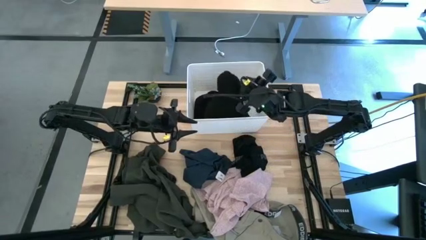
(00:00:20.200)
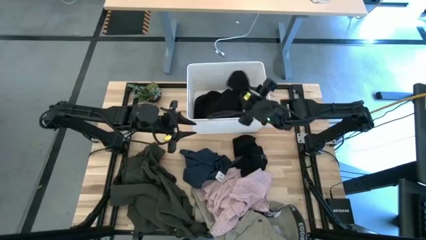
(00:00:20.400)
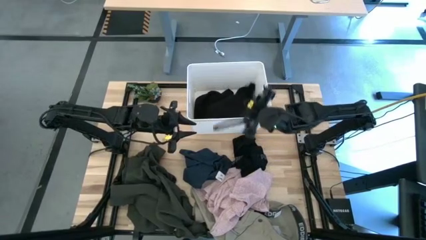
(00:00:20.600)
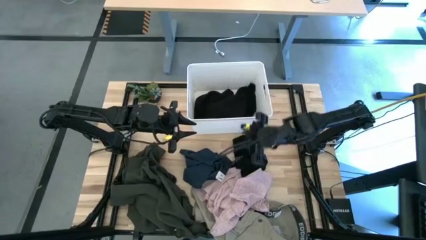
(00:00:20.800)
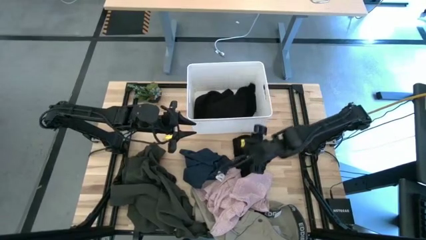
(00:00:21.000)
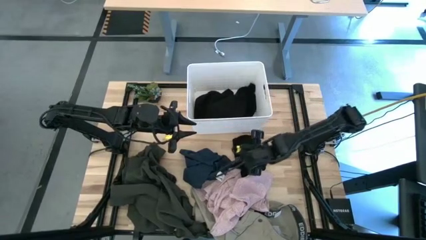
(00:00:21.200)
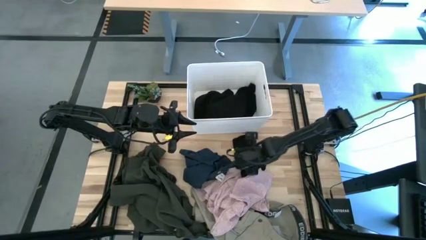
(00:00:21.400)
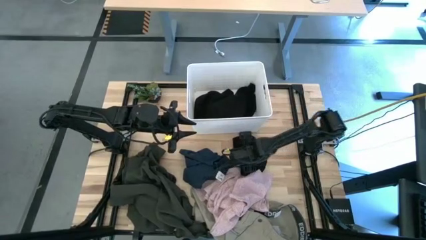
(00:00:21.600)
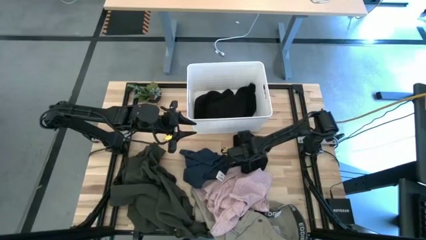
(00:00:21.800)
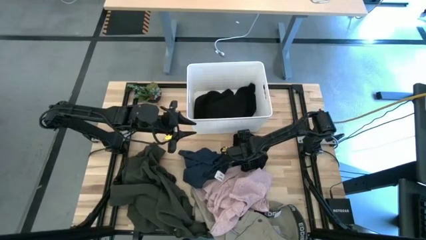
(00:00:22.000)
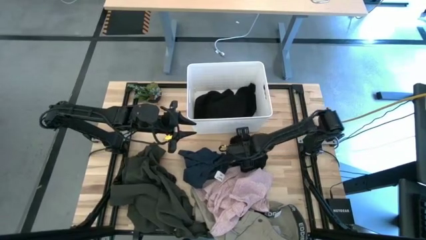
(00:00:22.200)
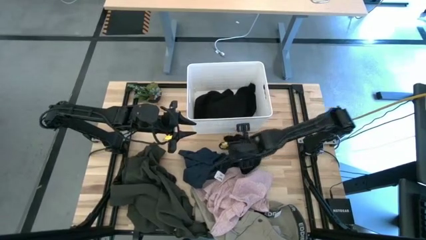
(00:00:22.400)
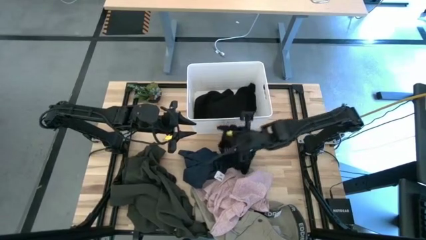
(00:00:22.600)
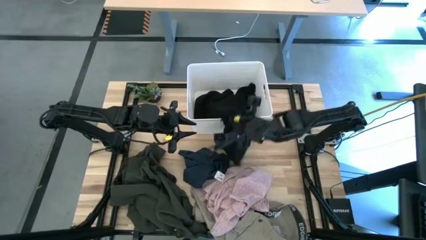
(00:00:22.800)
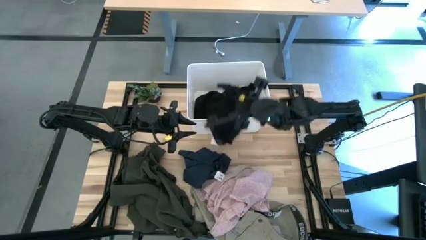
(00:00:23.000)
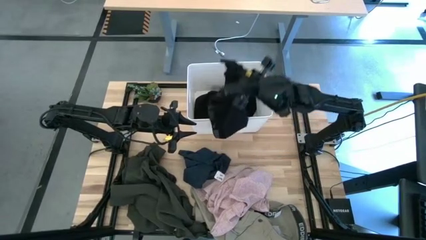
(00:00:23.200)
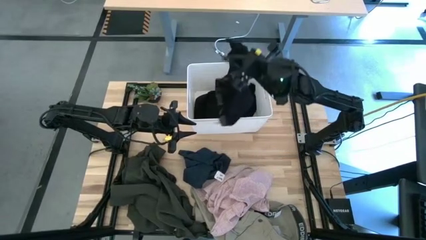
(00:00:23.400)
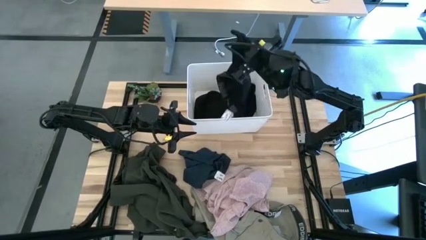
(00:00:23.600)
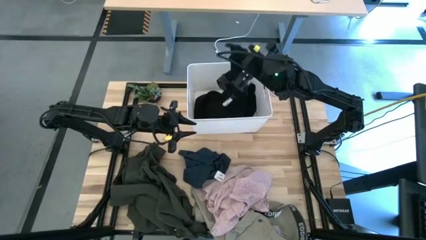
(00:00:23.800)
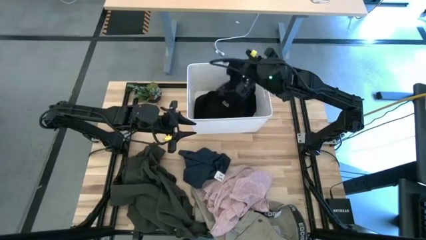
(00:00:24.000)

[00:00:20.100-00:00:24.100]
Task: Sort clothes
Put the boxer into the white laundry bin

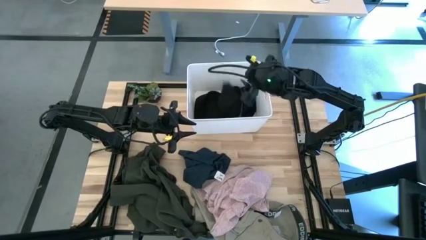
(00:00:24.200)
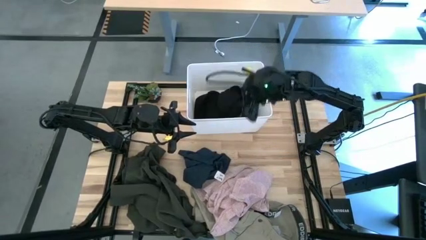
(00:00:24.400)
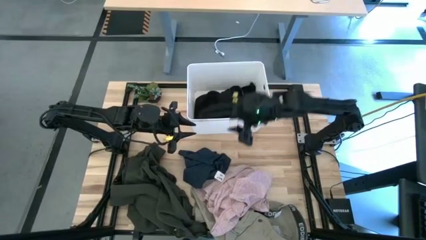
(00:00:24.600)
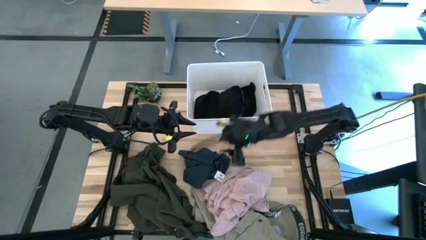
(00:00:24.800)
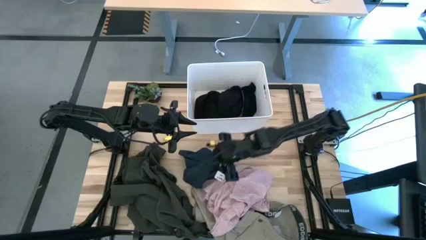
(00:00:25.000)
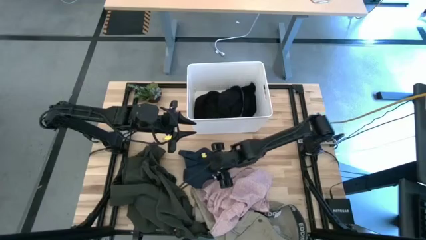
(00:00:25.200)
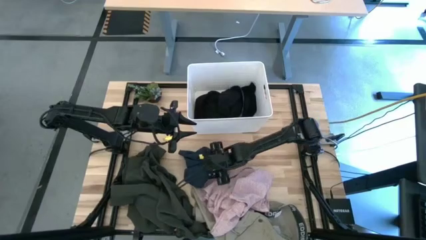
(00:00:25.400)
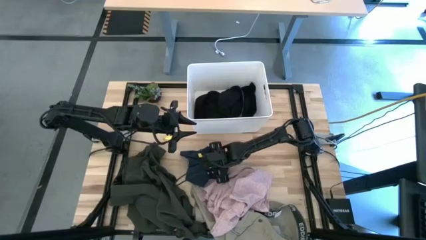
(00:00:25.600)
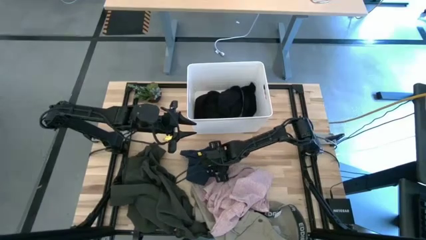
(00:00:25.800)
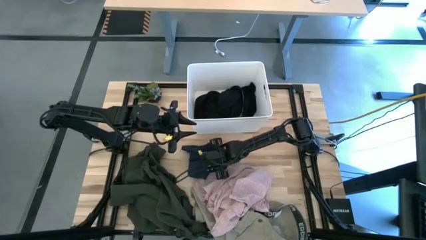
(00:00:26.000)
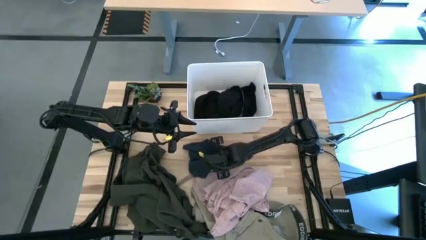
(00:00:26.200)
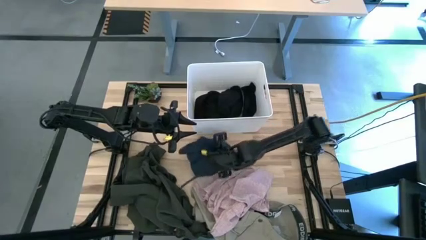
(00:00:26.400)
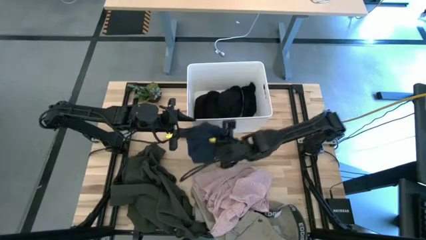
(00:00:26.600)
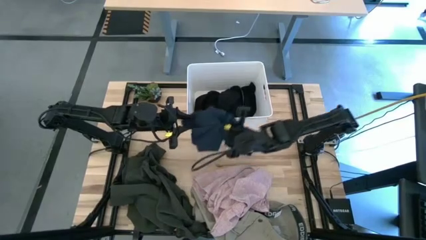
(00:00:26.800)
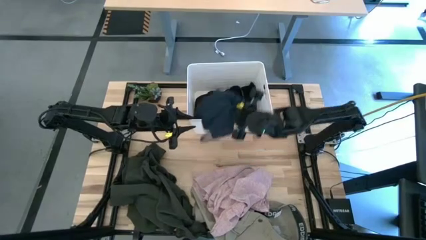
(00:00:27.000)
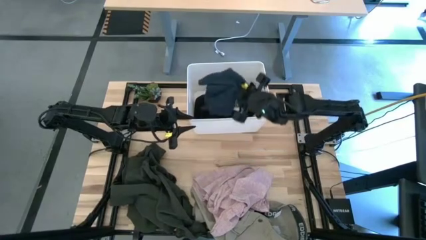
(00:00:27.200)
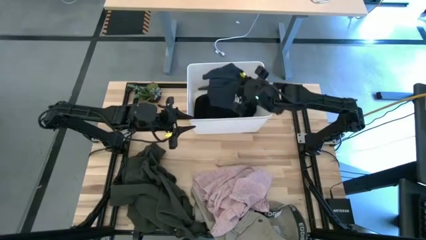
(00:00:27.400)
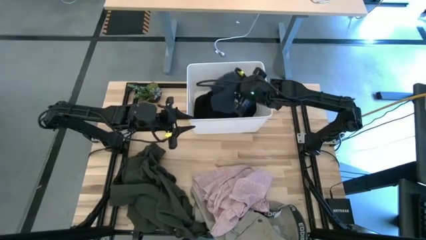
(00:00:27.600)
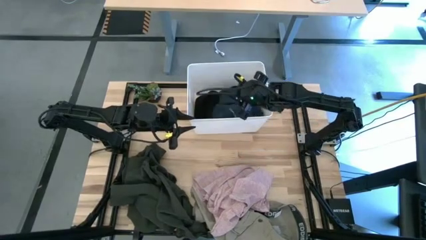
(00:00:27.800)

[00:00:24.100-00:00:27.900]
Put the blue shorts into the white laundry bin

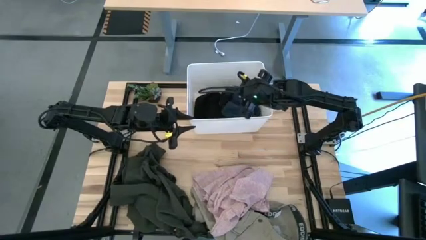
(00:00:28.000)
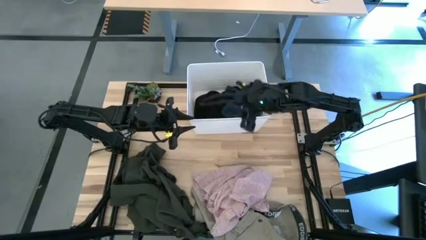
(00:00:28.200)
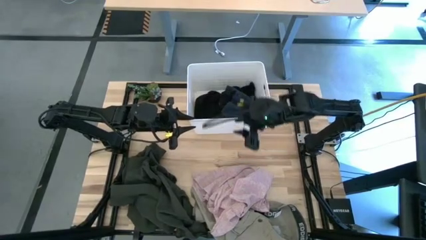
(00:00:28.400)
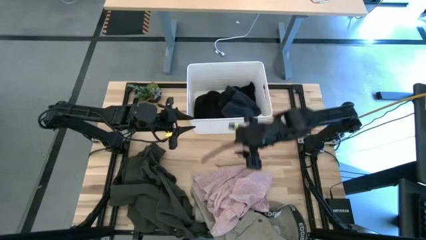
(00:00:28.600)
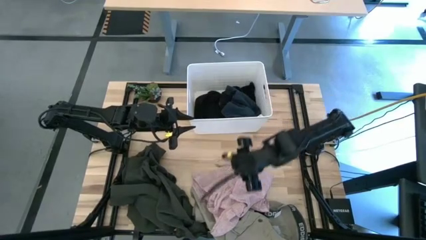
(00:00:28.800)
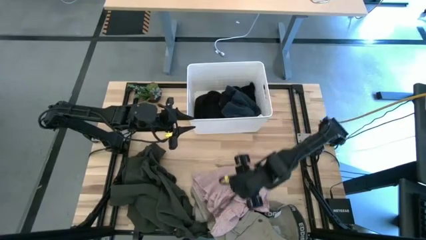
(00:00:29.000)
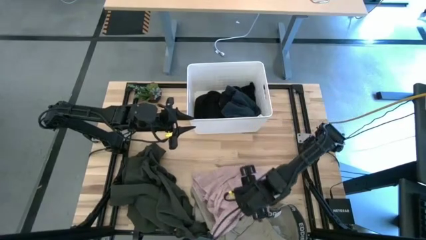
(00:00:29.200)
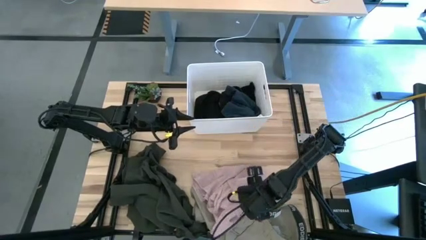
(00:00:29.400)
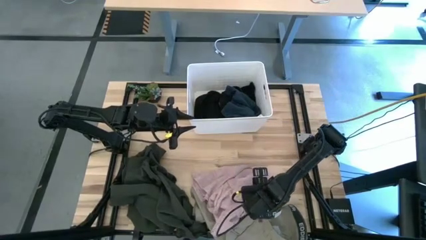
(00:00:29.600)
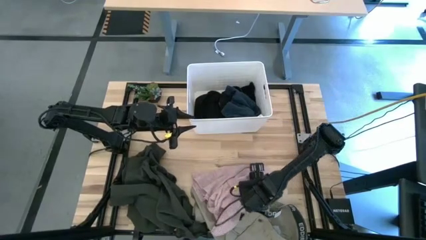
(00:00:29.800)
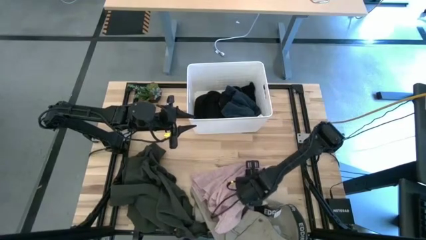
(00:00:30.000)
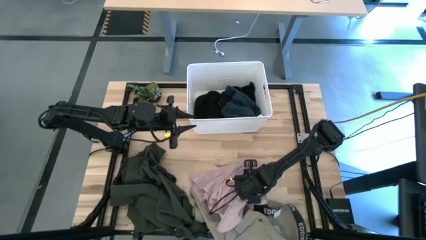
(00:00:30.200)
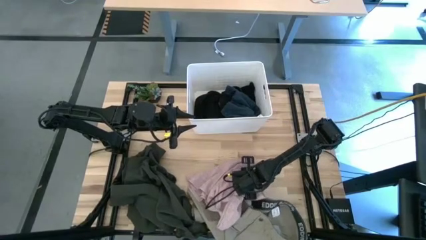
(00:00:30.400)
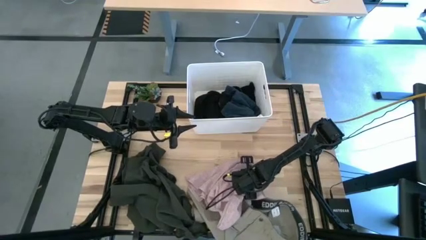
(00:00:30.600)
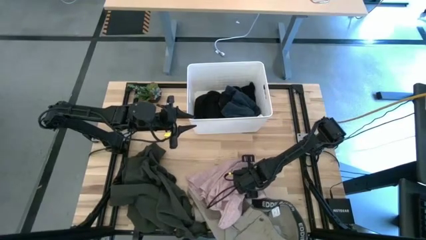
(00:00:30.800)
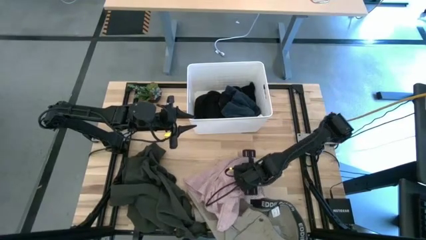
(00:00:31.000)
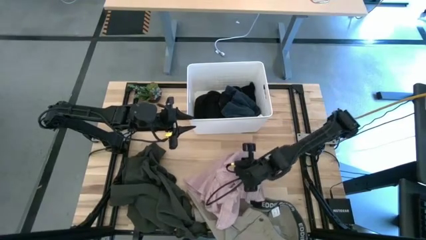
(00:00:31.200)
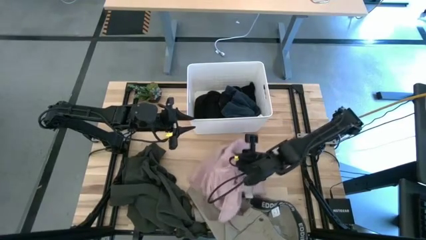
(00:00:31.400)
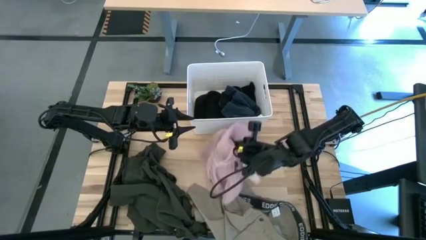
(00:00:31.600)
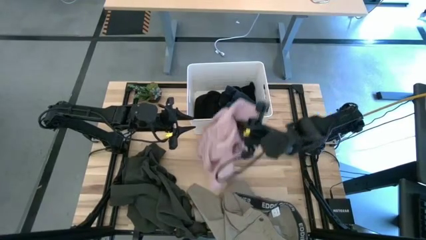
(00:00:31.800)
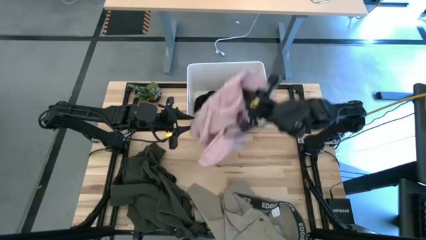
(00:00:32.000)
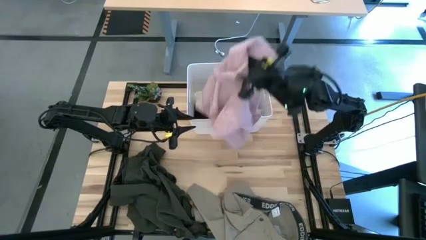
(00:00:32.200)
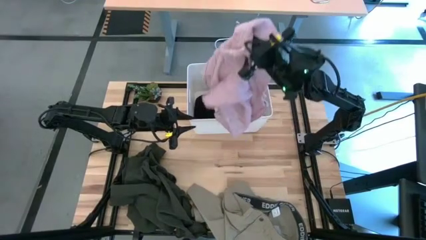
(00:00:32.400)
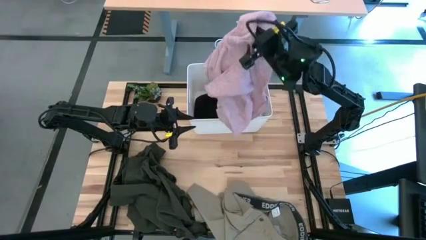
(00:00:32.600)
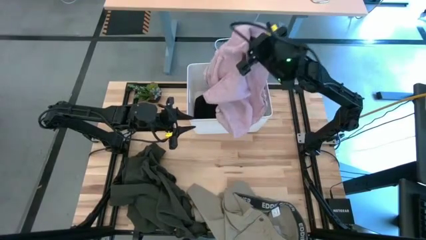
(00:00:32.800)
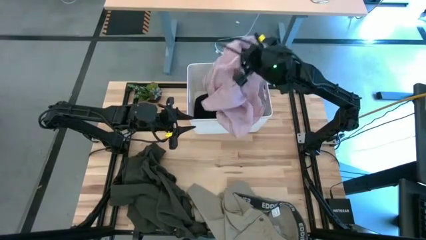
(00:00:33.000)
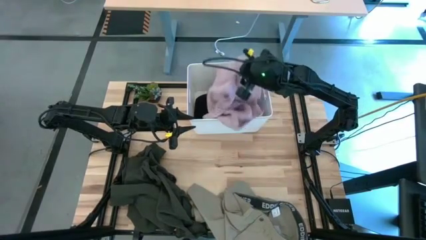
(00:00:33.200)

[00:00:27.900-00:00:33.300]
Put the pink shirt into the white laundry bin

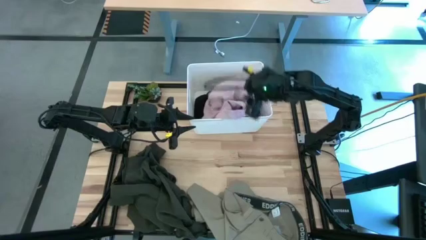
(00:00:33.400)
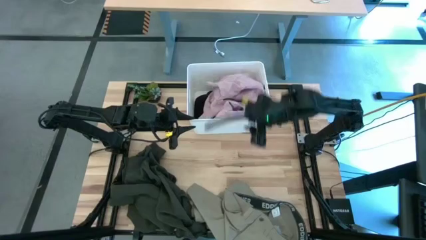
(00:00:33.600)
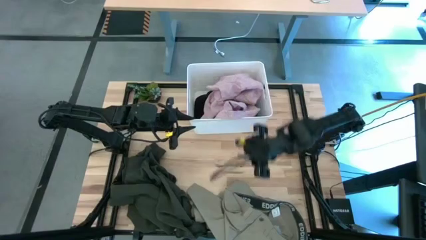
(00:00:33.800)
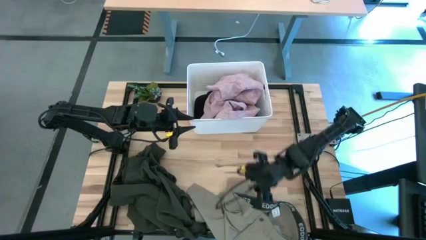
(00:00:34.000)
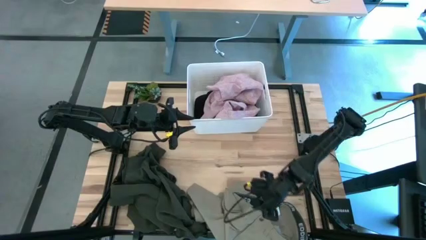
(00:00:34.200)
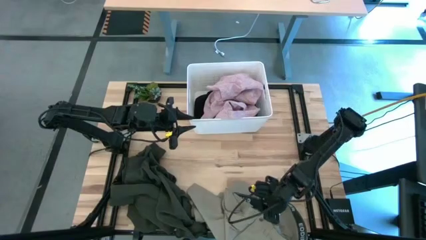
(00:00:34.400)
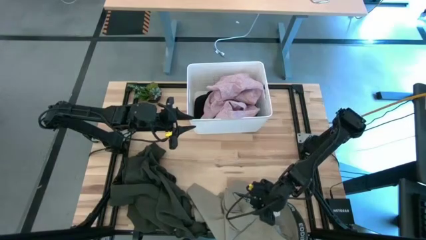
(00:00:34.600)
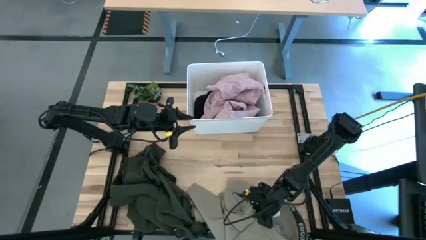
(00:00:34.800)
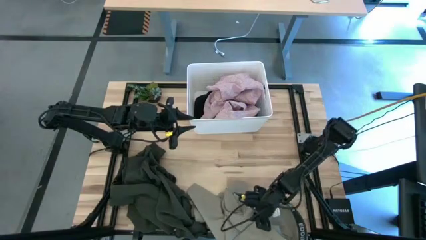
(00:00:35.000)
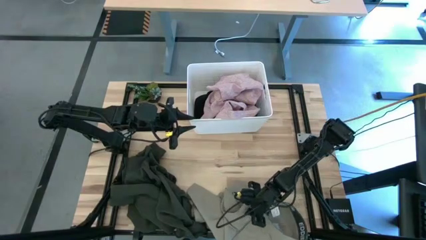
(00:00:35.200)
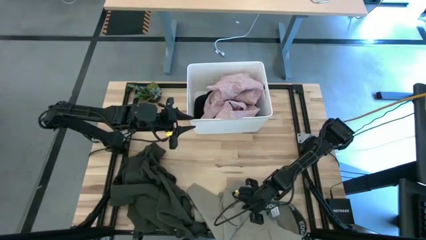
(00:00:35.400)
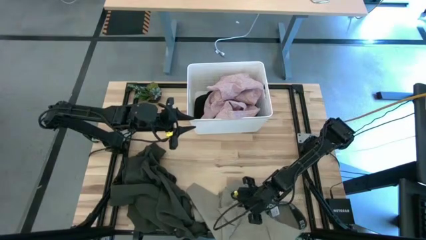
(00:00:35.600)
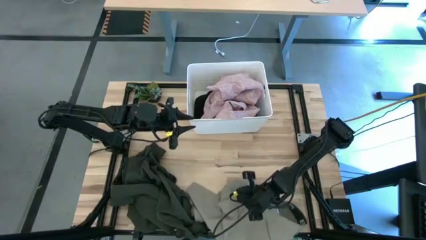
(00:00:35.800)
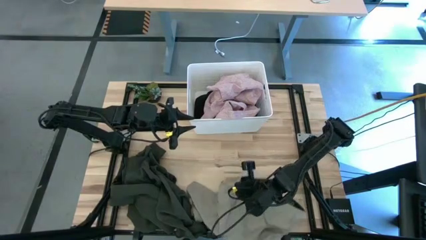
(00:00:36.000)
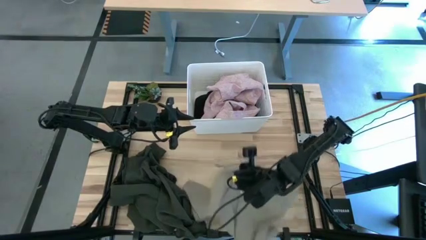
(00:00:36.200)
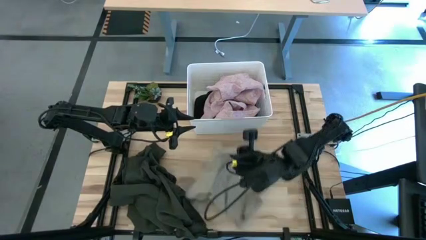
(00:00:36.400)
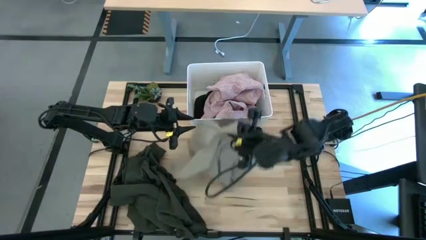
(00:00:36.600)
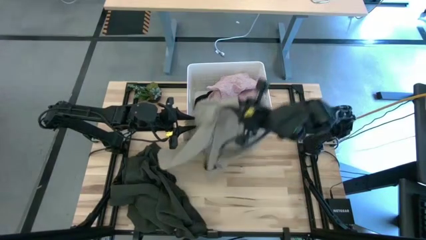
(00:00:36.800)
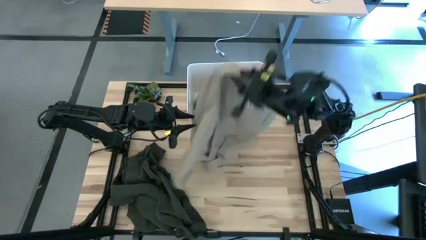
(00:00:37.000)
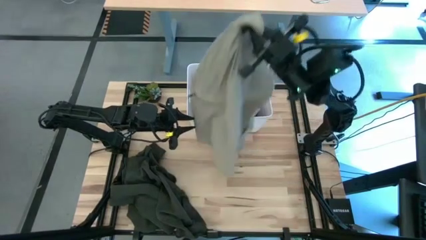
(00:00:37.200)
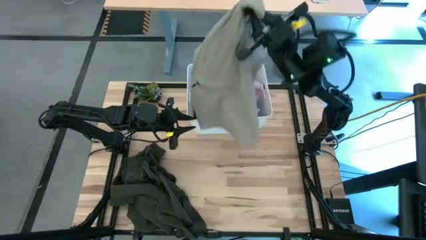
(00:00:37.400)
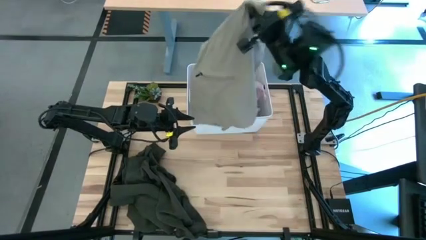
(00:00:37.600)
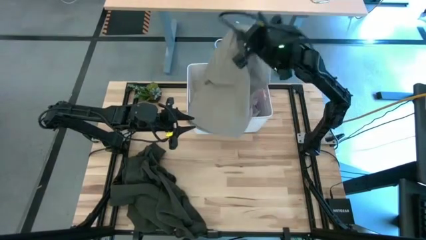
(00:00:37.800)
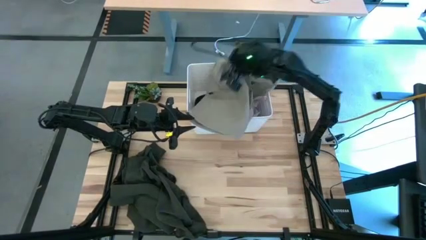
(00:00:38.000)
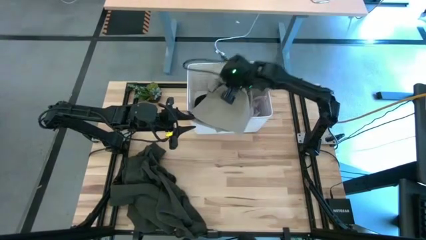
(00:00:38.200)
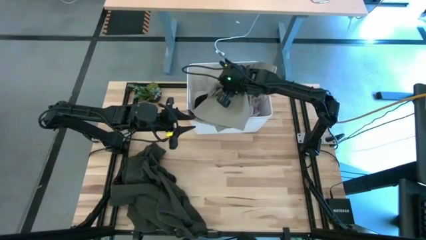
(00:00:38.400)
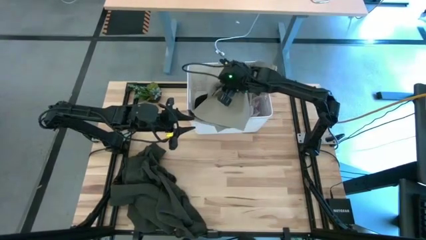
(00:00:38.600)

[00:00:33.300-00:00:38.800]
Put the brown shorts into the white laundry bin
